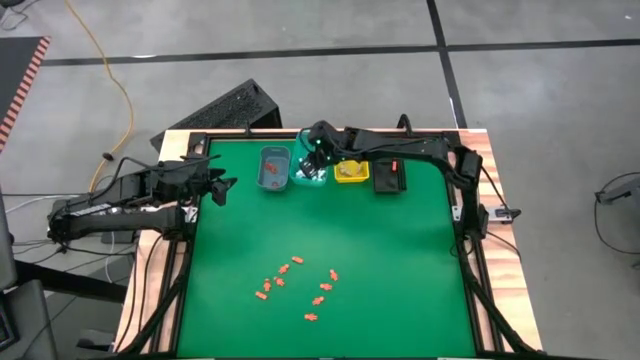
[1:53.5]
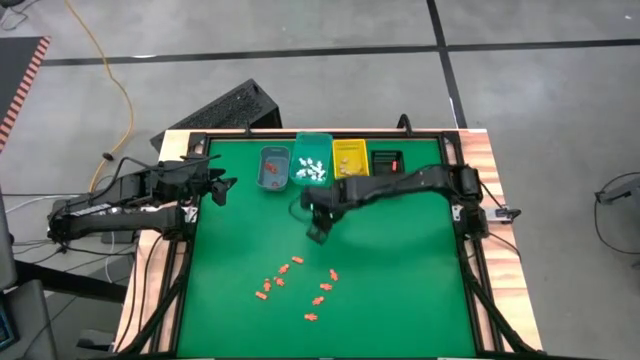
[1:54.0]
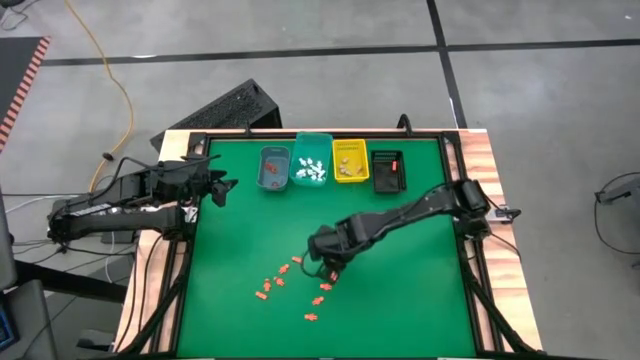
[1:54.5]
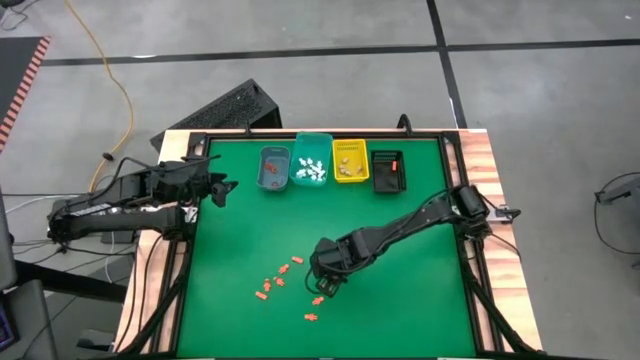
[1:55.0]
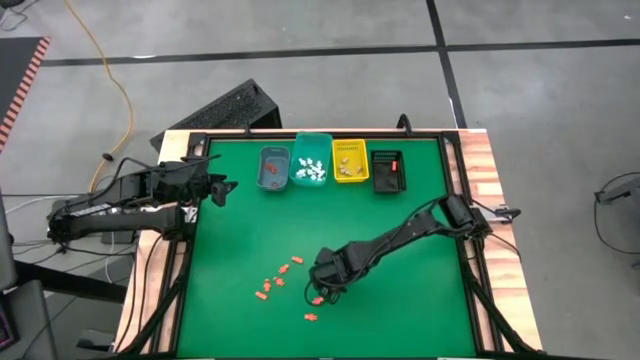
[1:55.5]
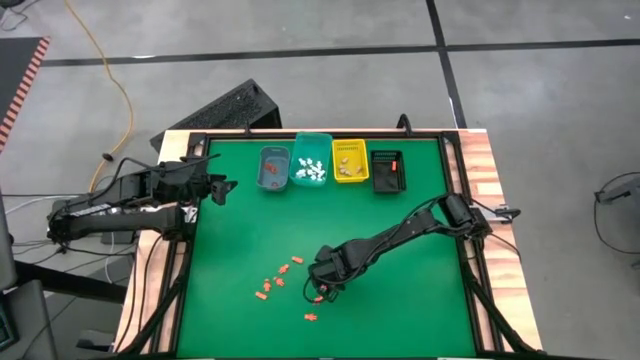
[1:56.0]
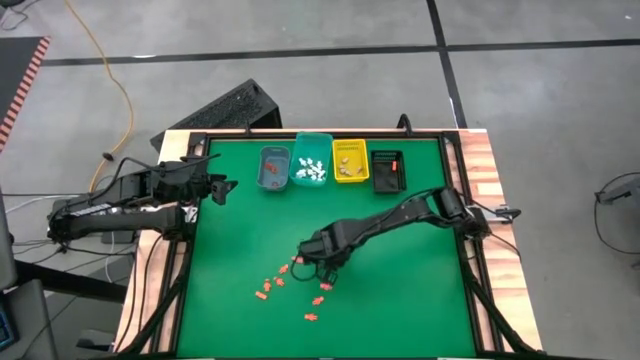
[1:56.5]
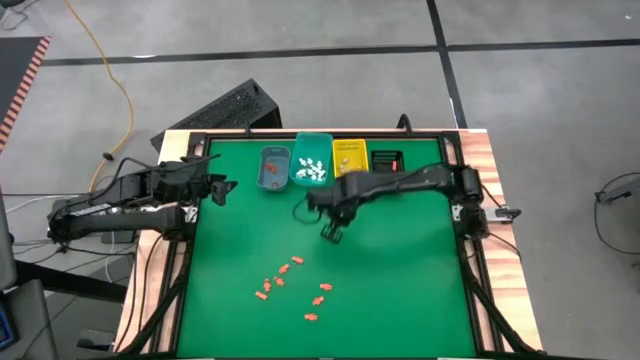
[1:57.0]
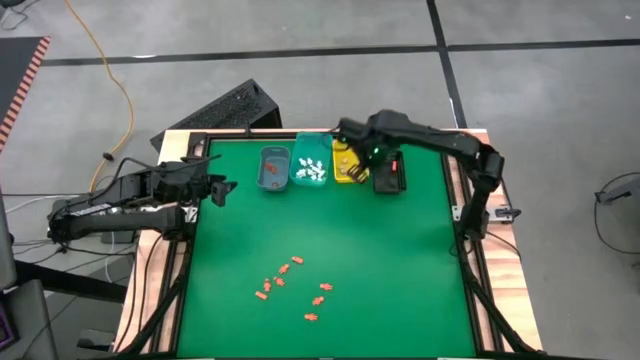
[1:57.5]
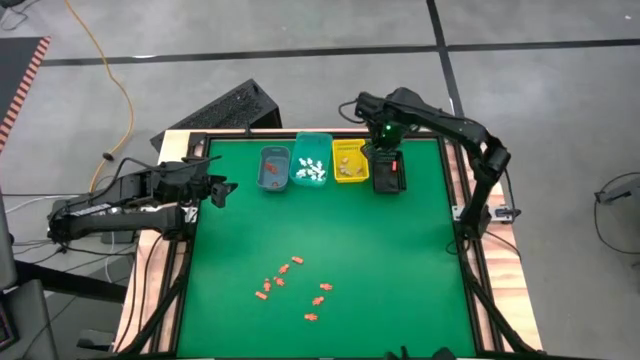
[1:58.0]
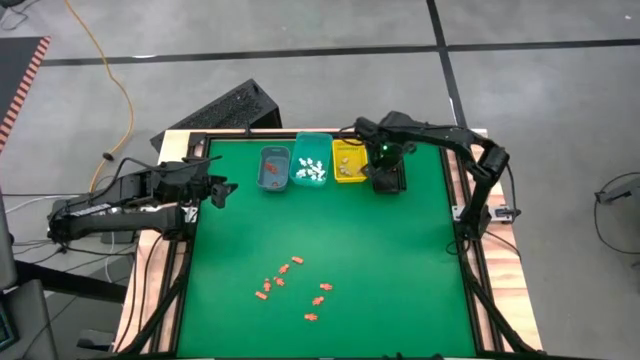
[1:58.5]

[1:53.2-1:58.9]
Task: Sort Halloween decoration
Put the orange skeleton toy into the black bin

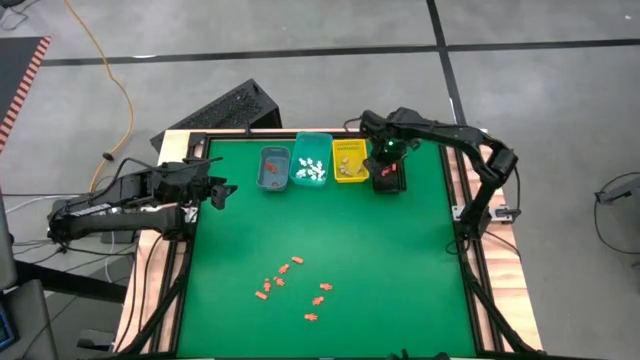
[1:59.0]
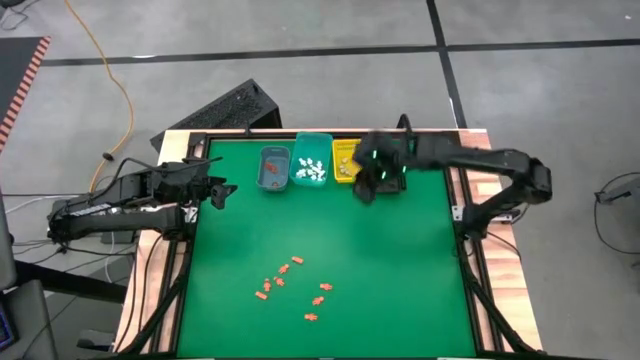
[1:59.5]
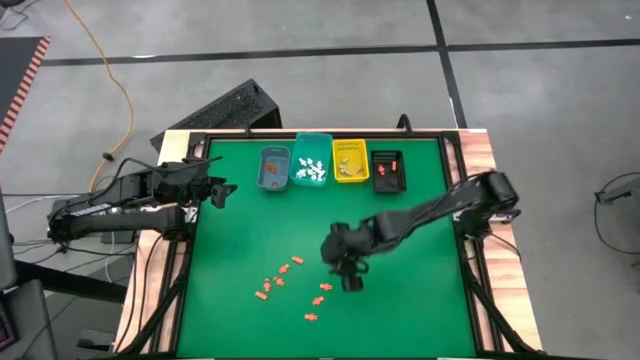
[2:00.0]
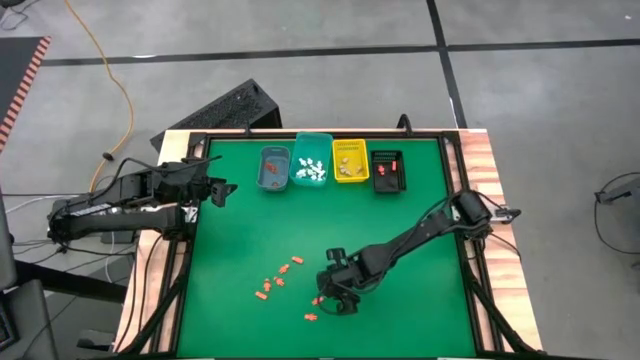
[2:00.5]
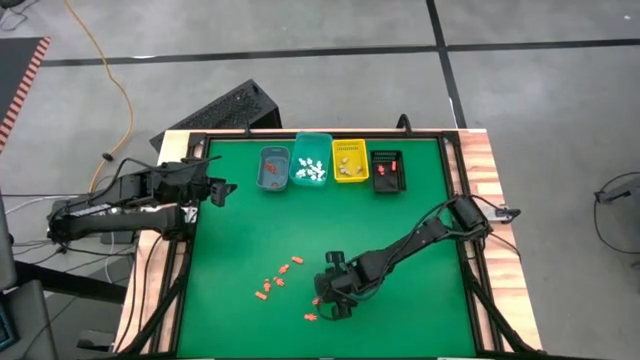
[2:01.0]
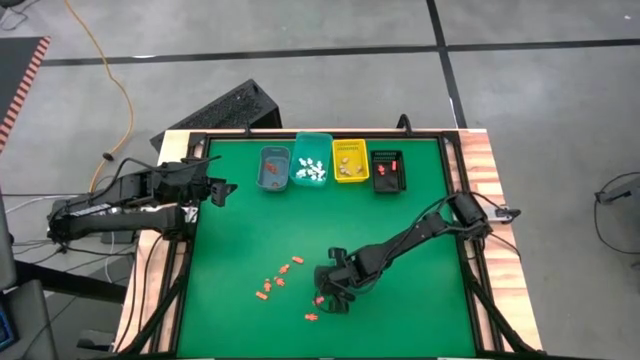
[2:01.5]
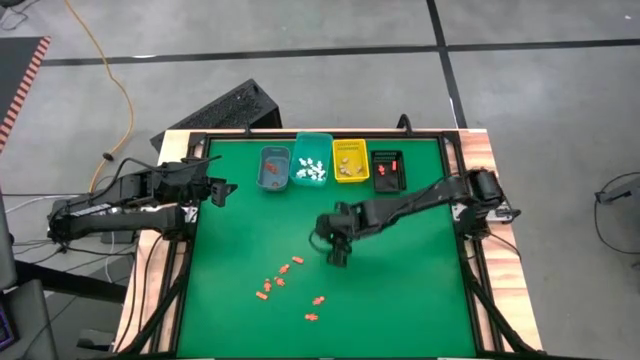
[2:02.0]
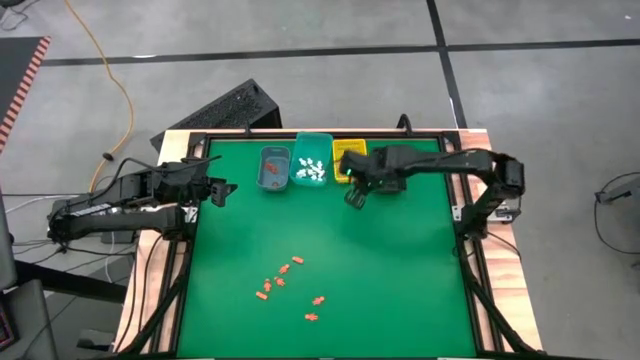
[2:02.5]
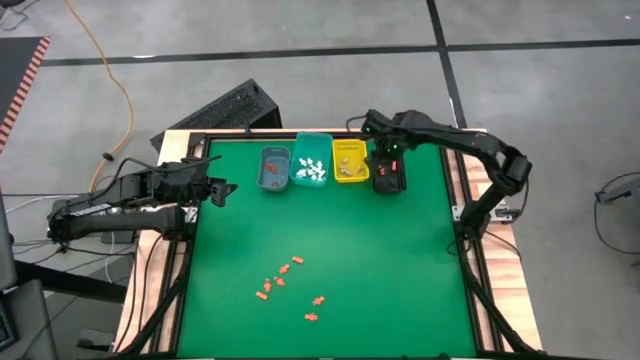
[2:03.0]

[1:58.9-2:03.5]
Put the orange skeleton toy into the black bin

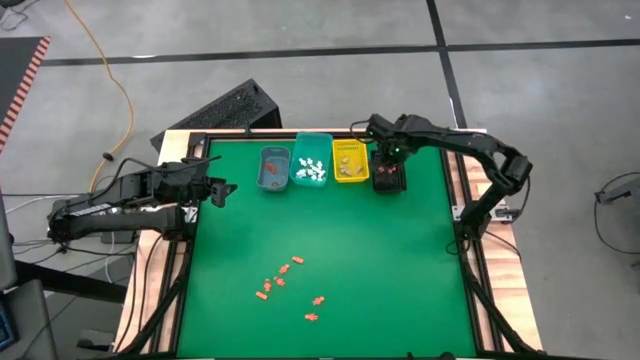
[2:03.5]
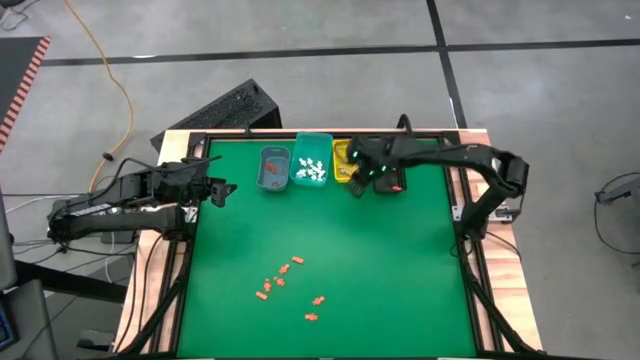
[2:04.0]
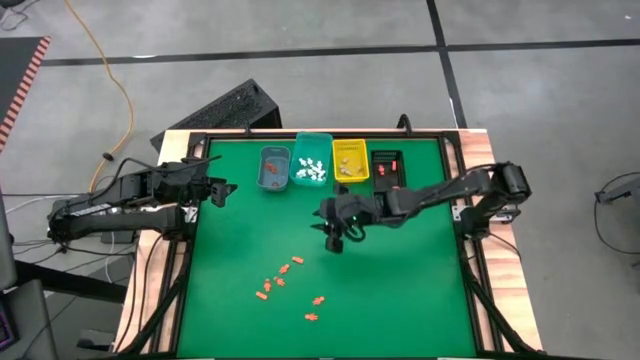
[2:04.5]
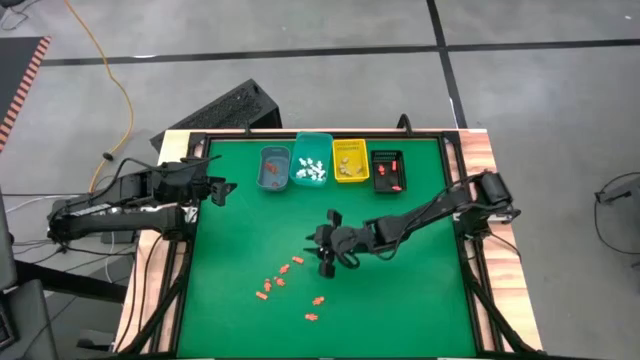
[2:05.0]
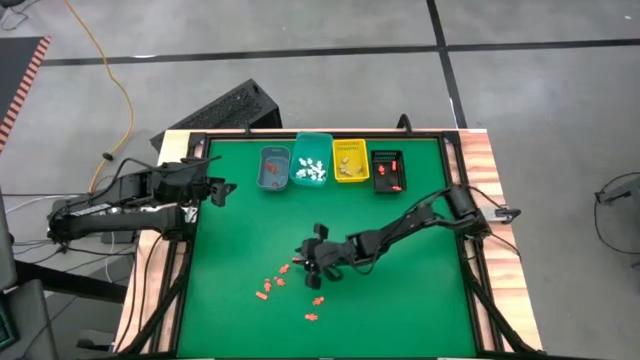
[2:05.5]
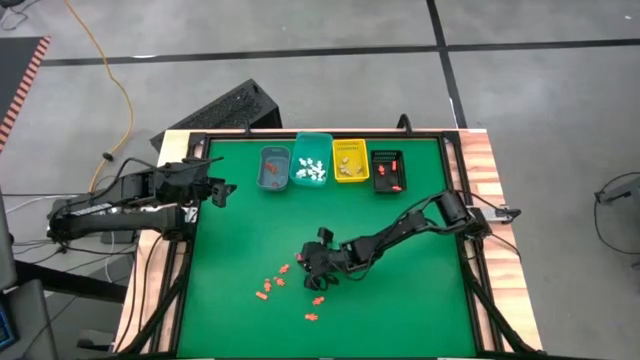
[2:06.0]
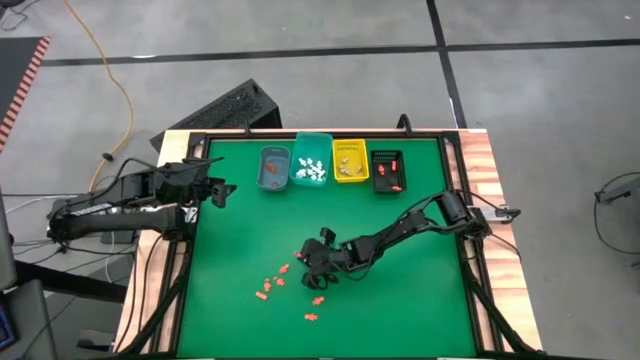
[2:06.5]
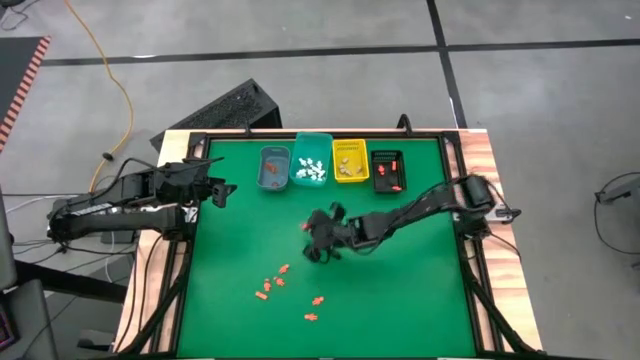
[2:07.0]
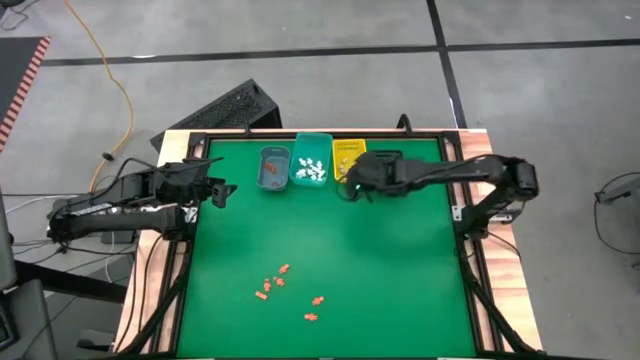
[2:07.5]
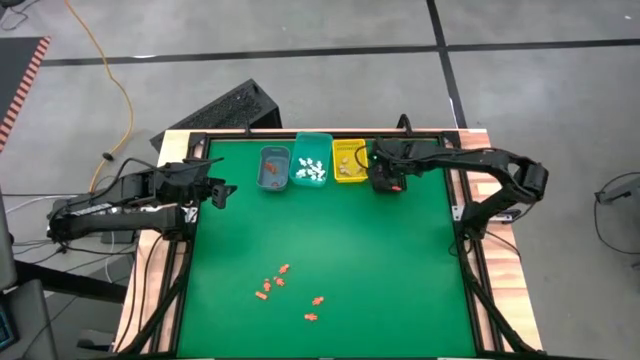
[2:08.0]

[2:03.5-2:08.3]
Put the orange skeleton toy into the black bin

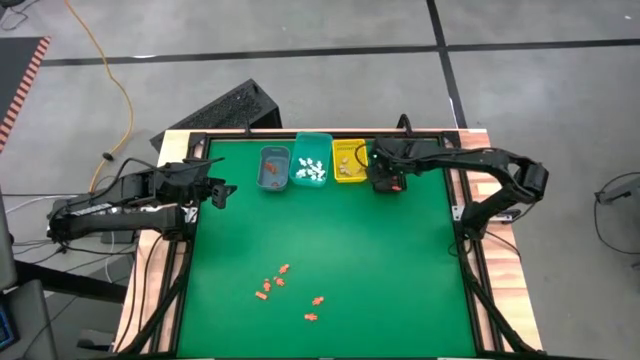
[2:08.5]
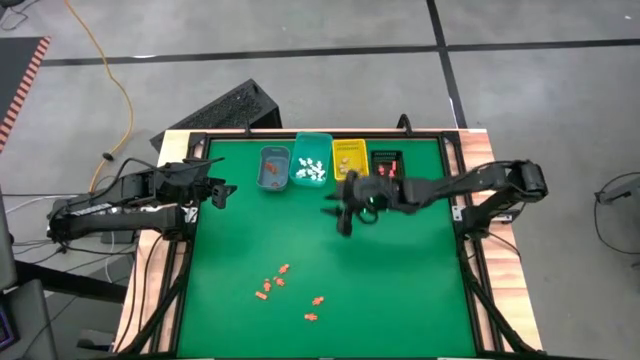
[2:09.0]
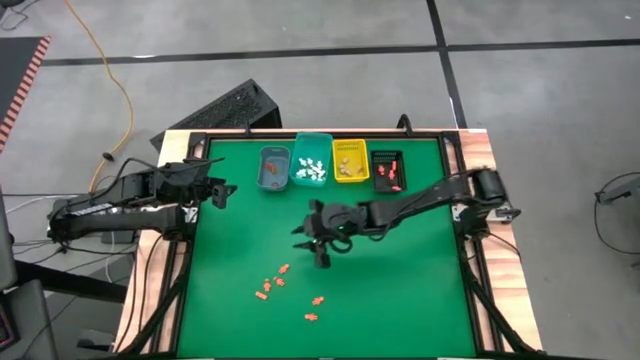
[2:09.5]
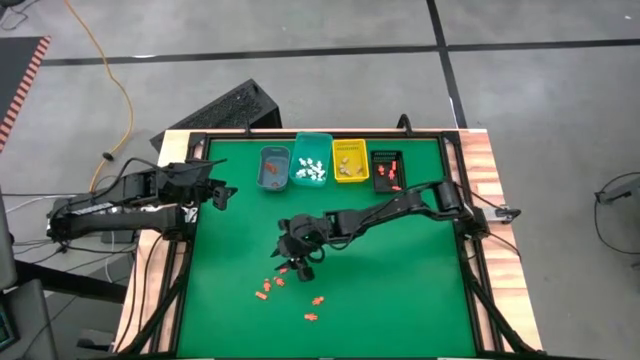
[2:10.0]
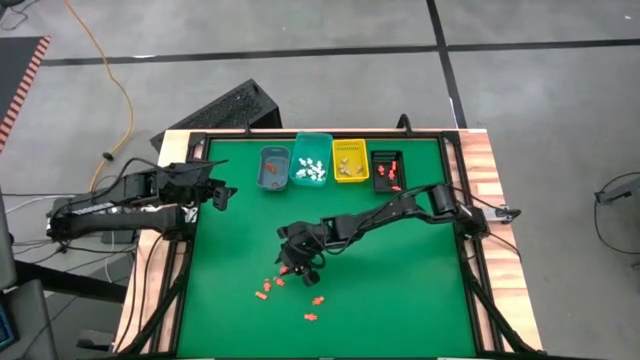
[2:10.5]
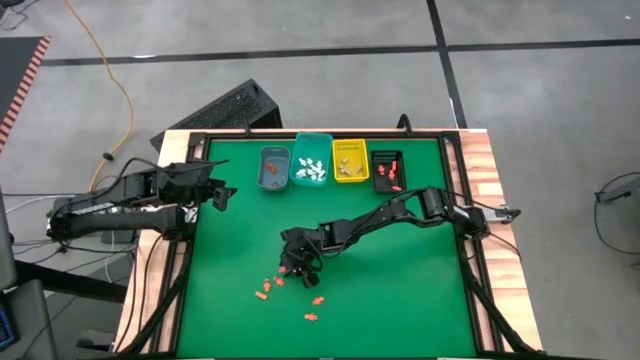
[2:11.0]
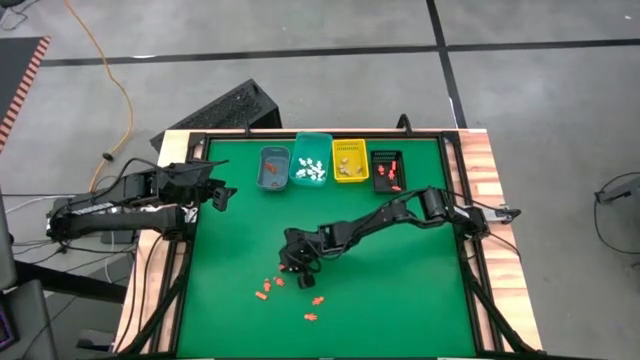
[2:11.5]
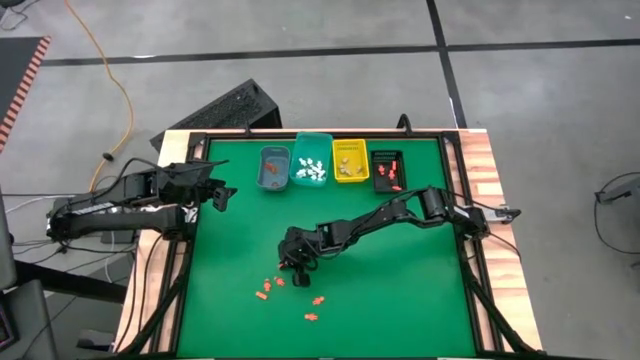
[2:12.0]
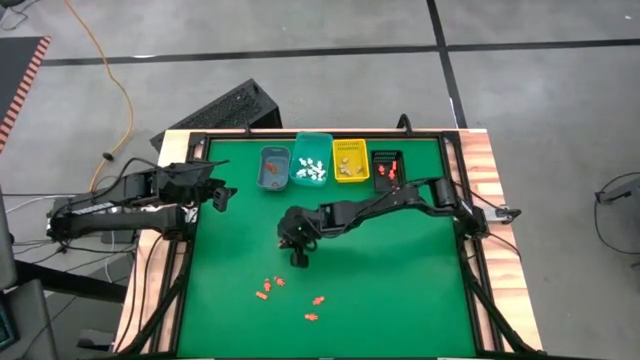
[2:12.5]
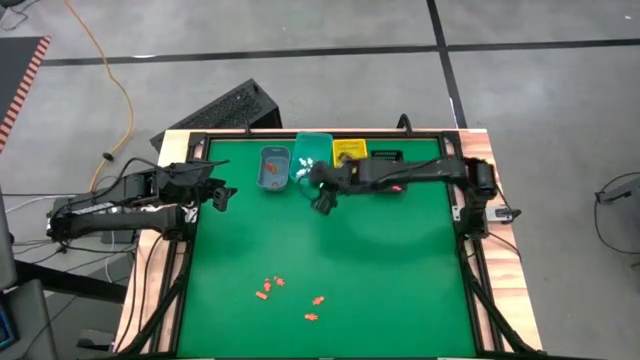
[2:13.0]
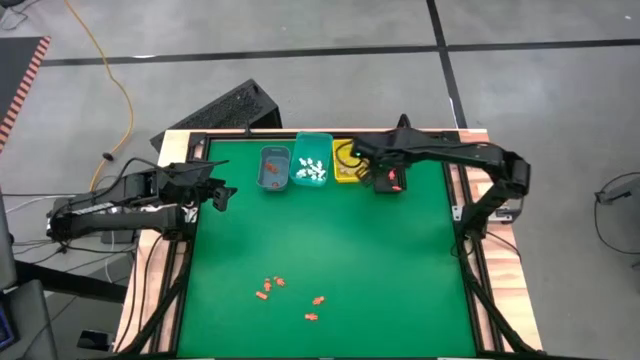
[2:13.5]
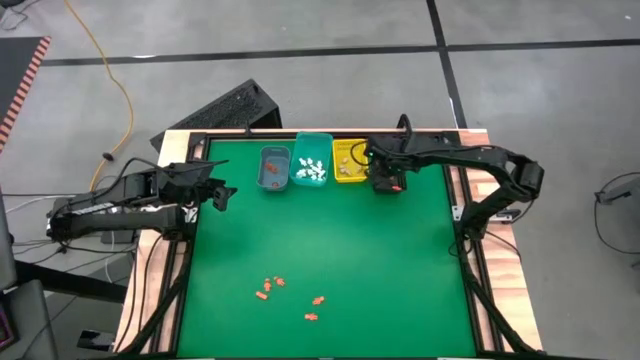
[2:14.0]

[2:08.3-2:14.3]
Put the orange skeleton toy into the black bin
